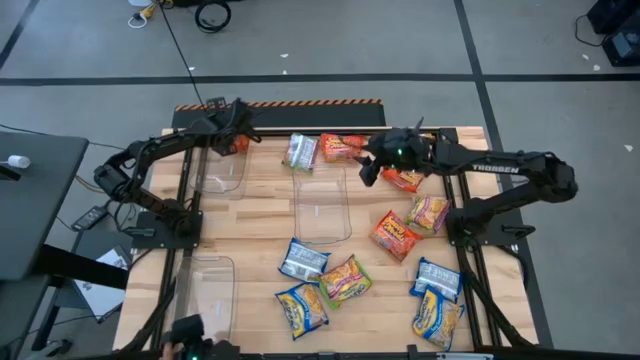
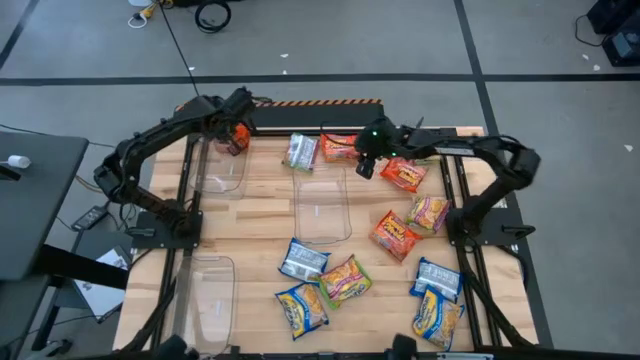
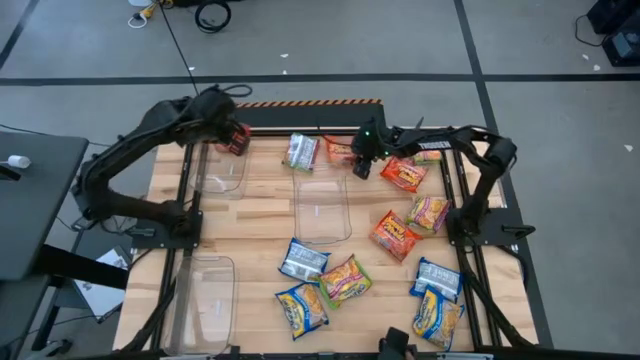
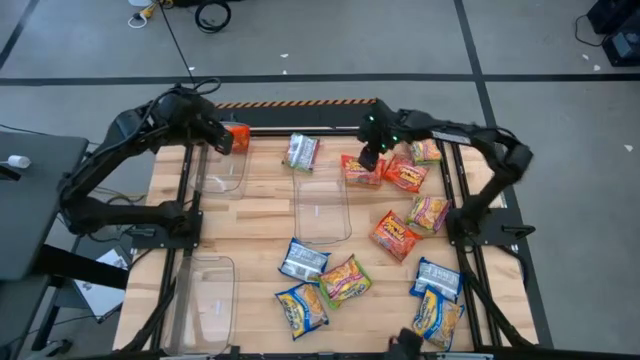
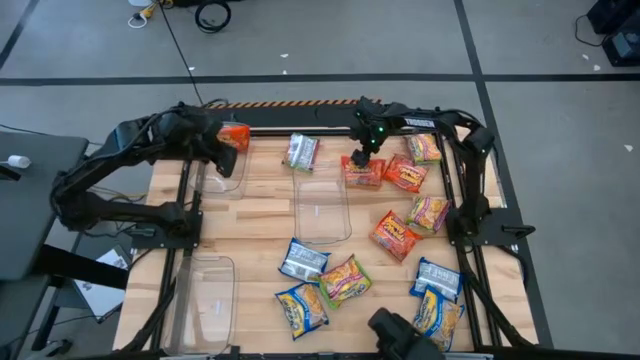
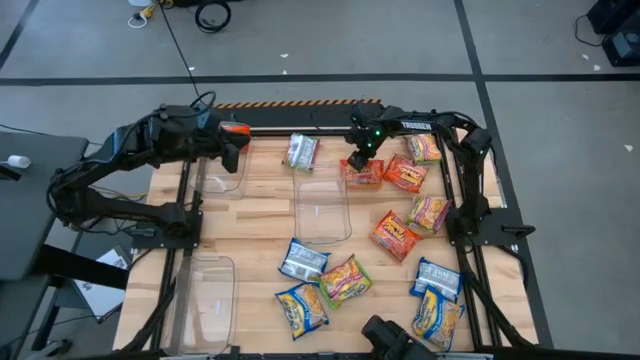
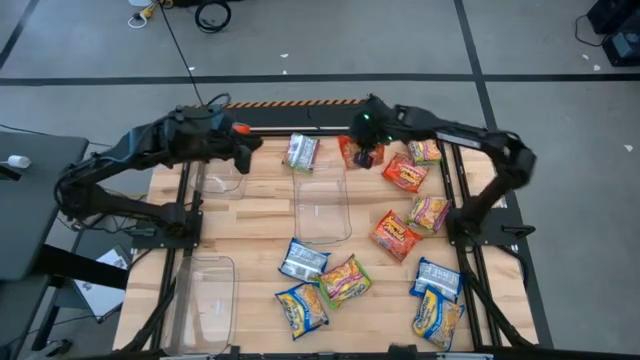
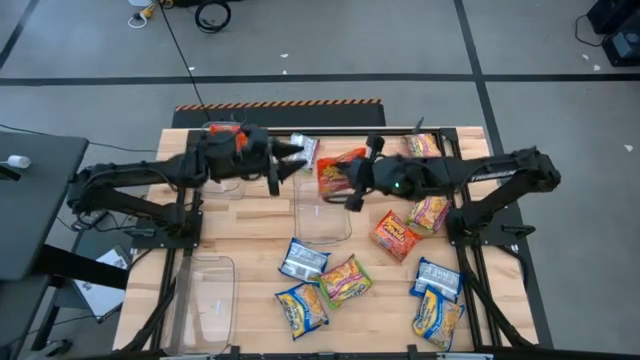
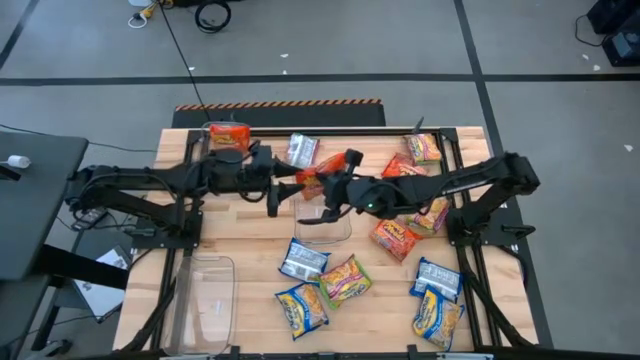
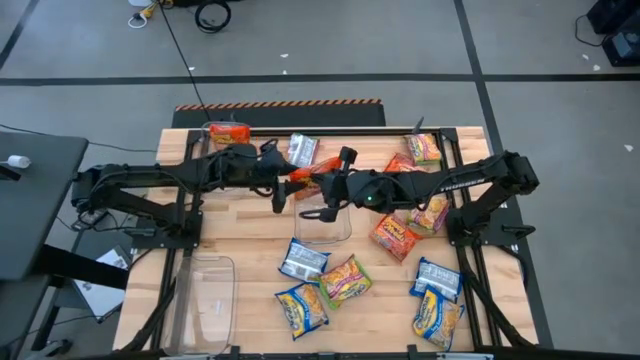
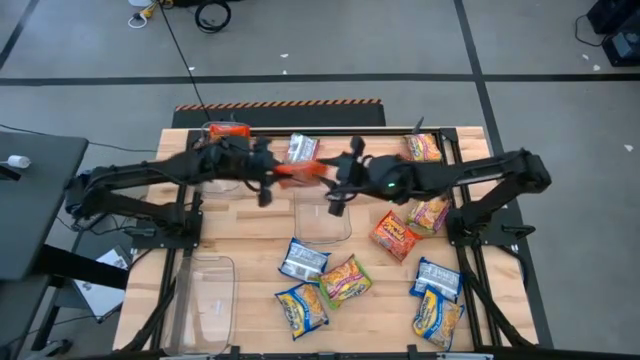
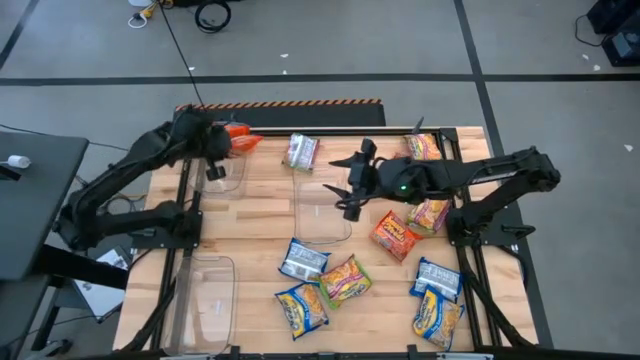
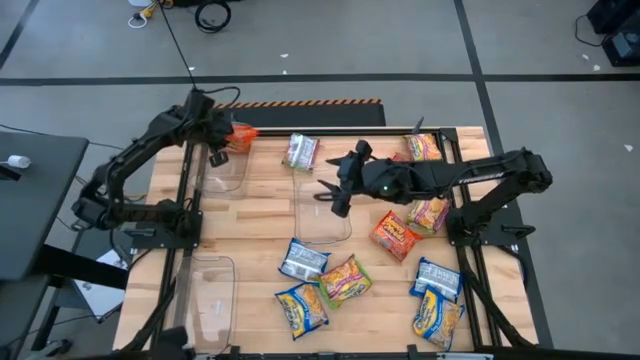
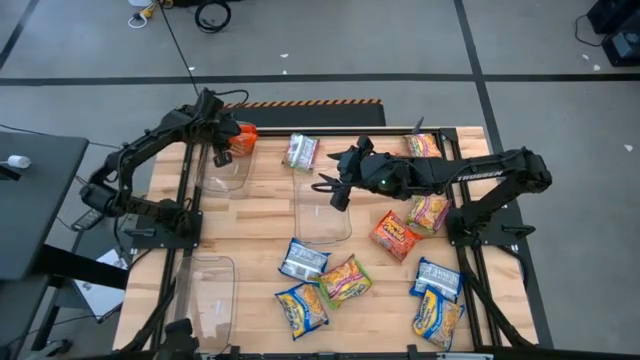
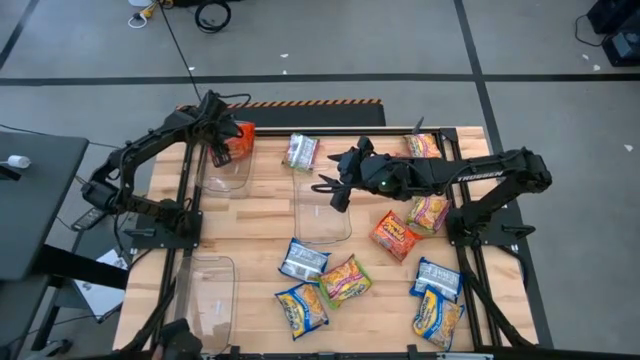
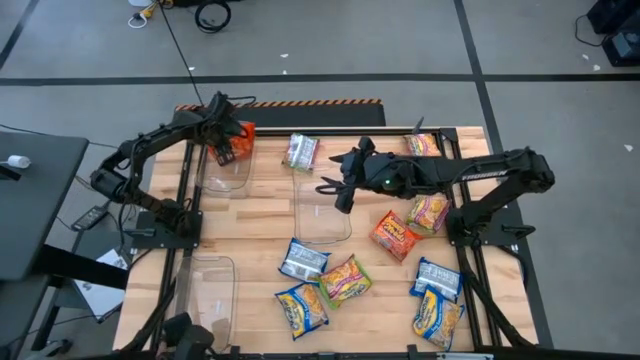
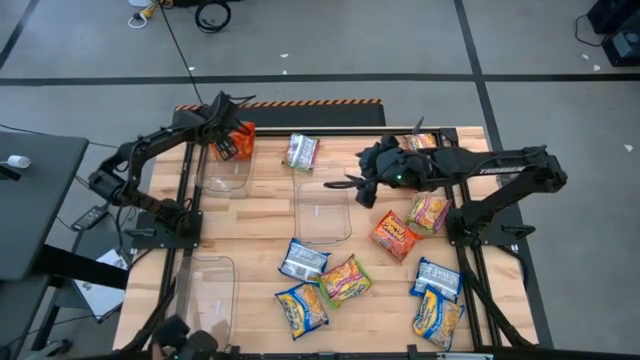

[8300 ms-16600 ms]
Task: Sort Maruchan noodles
Put the top left orange noodle pack into the top transparent bin

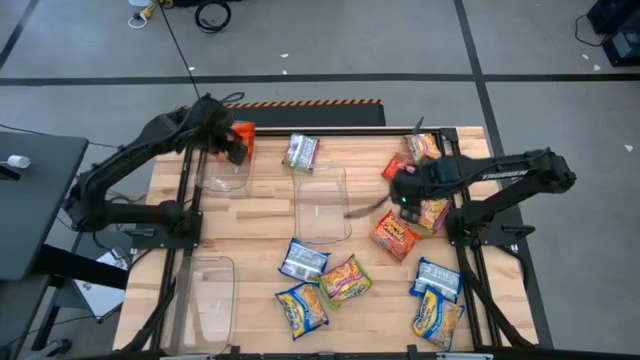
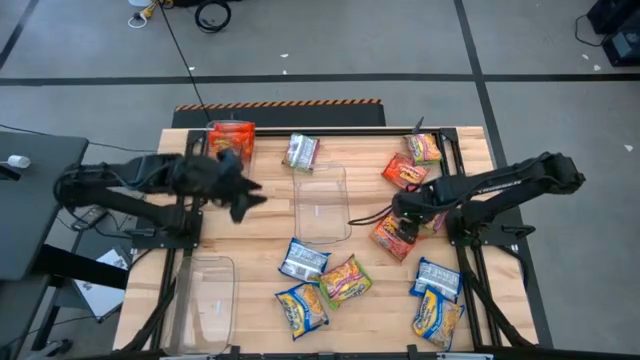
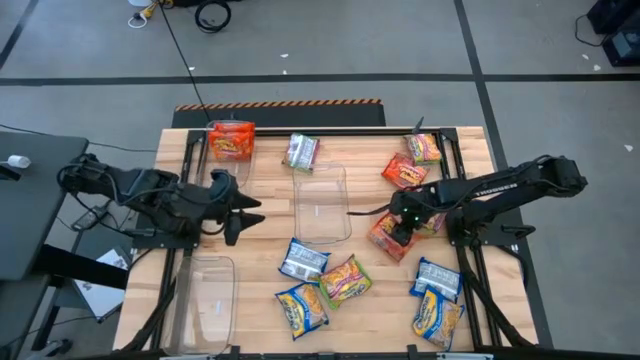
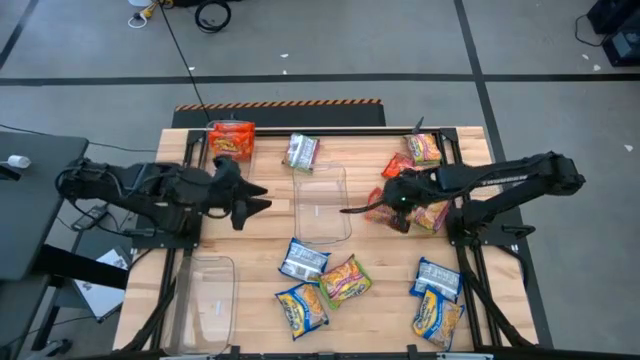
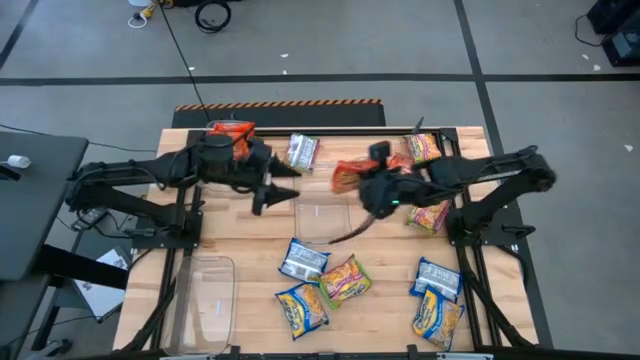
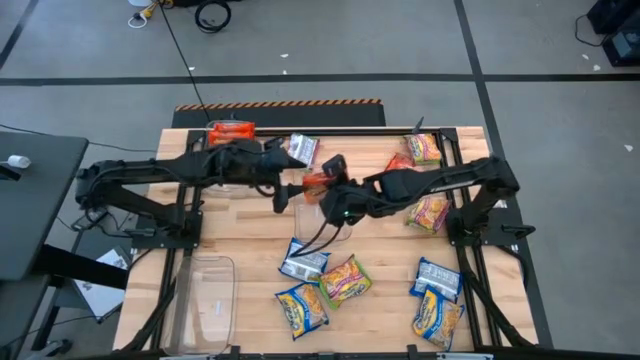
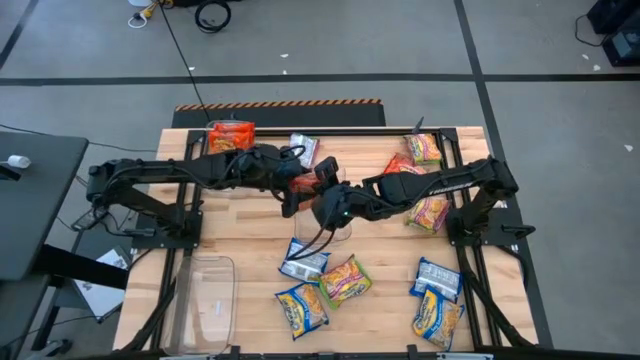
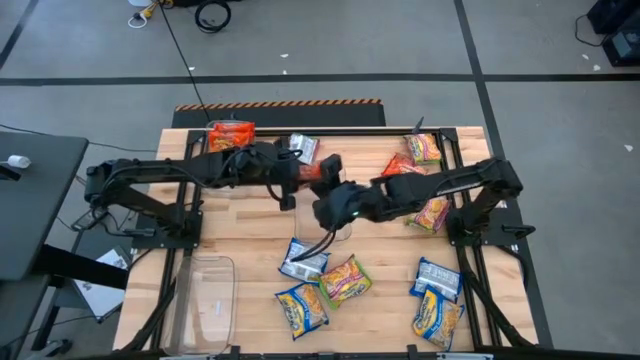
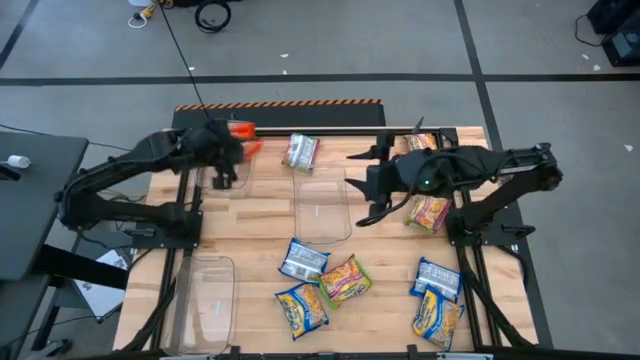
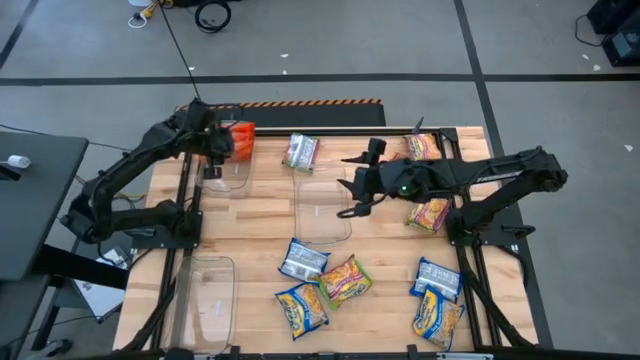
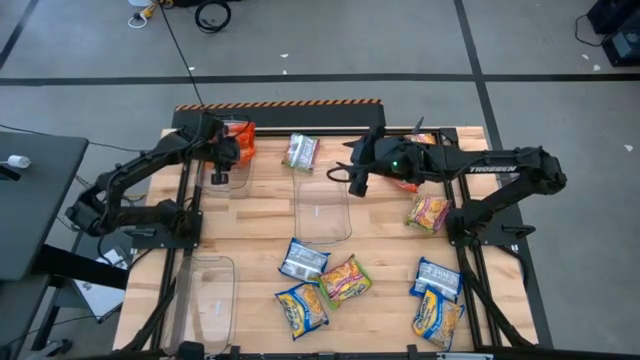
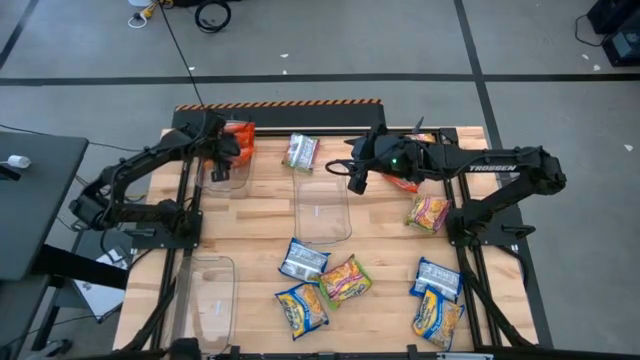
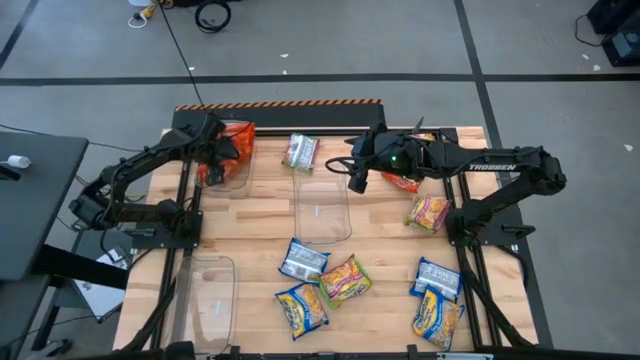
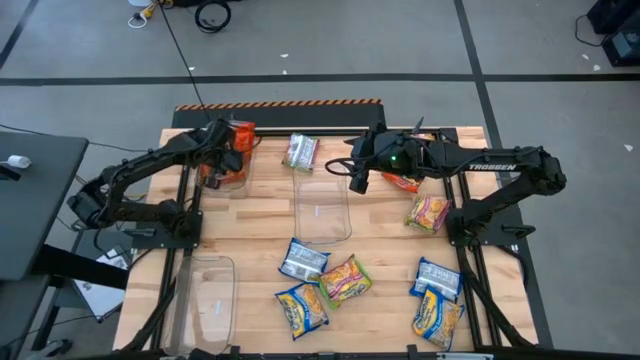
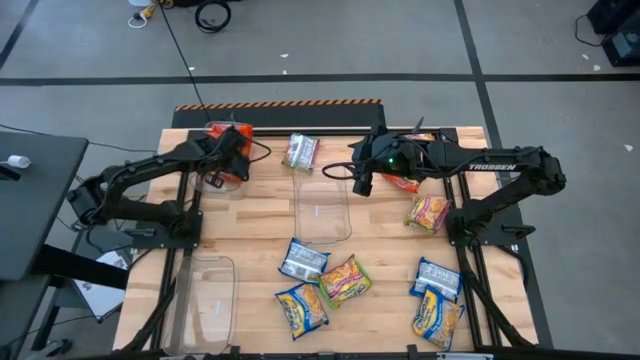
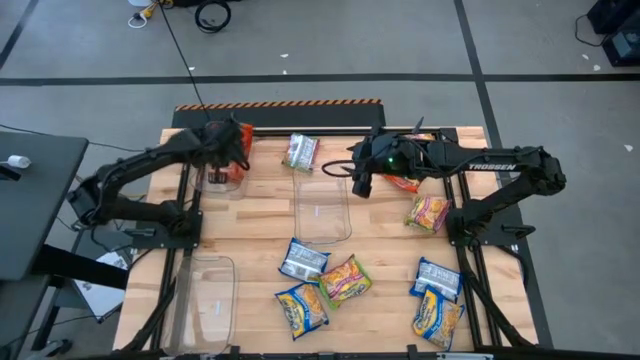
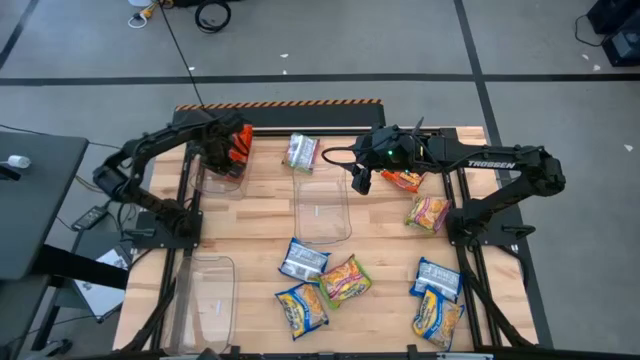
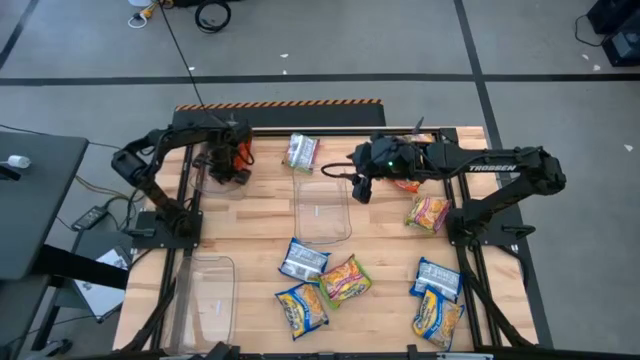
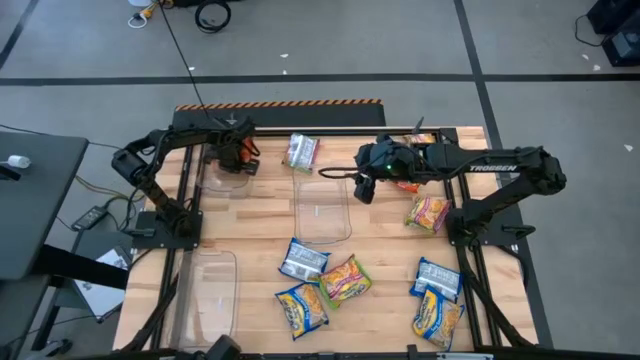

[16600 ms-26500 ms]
Put the bottom orange noodle pack into the top transparent bin

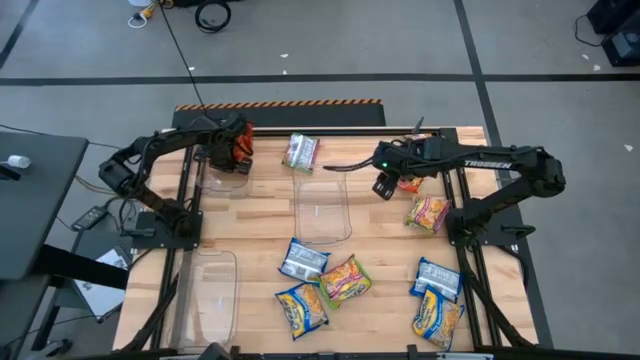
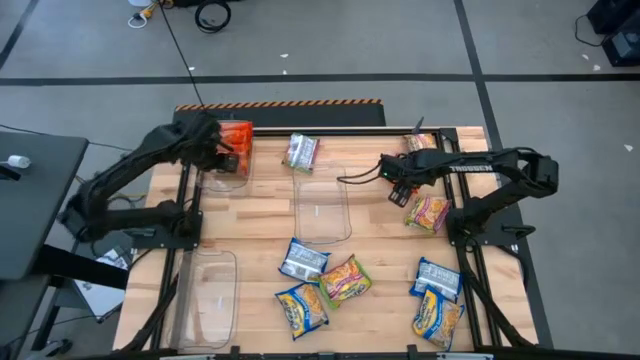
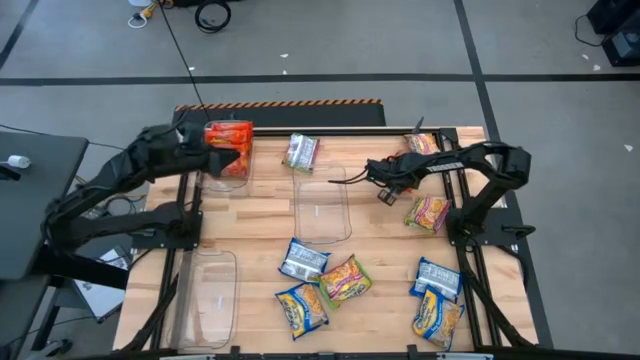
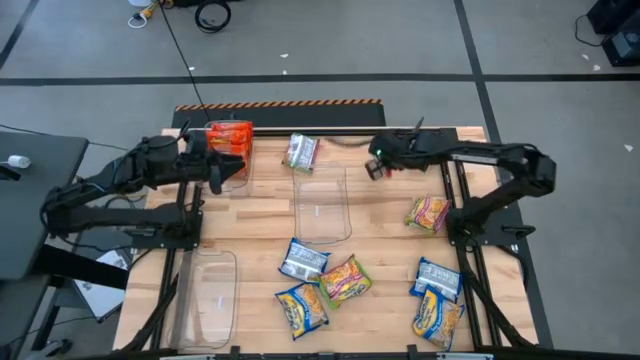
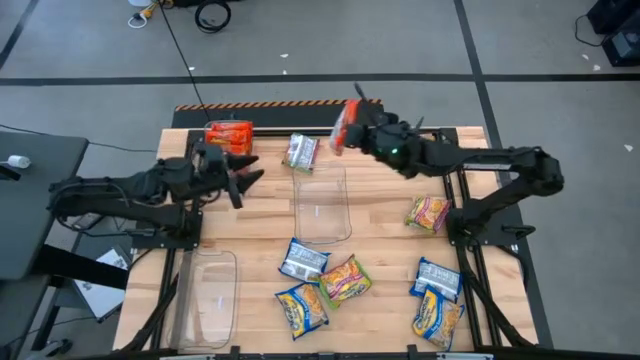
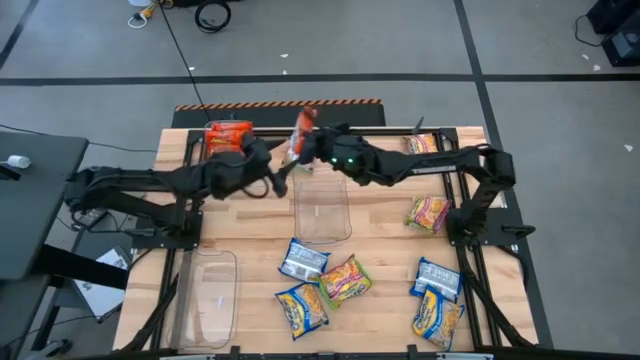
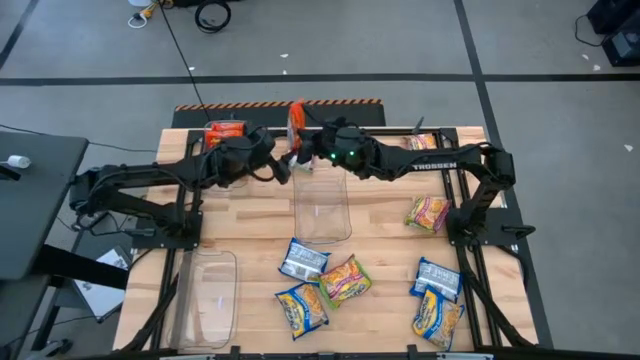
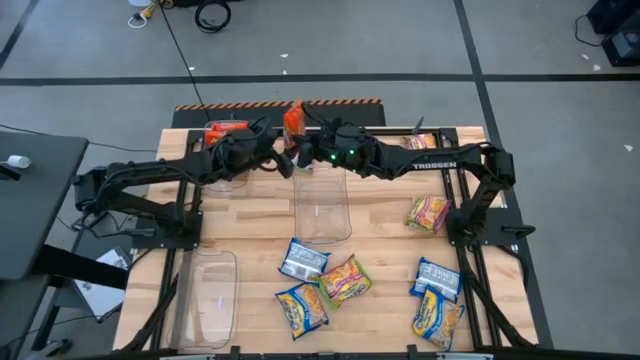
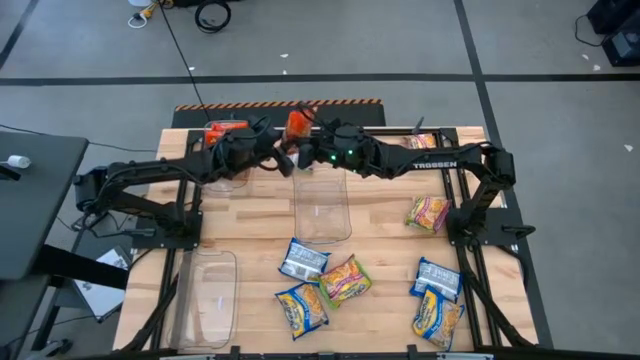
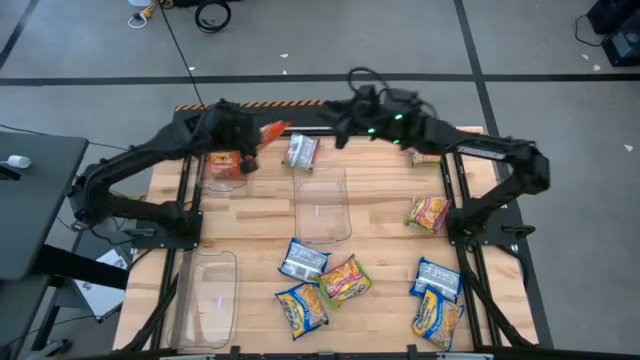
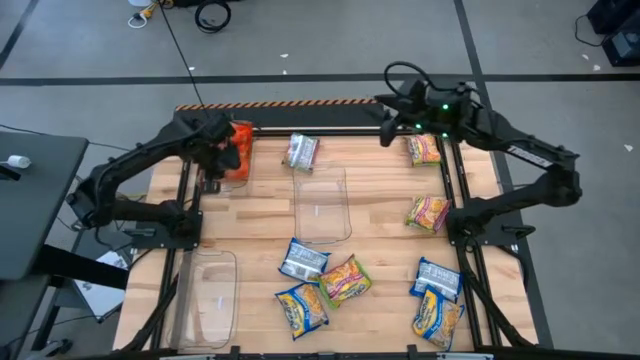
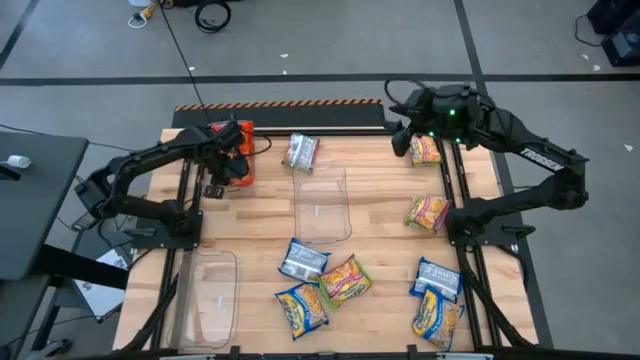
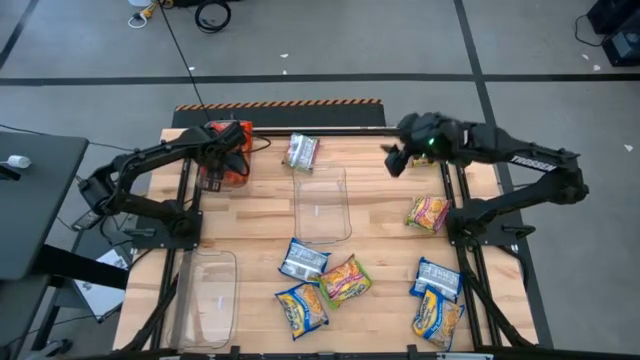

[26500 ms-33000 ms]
Put the orange noodle pack into the top transparent bin
